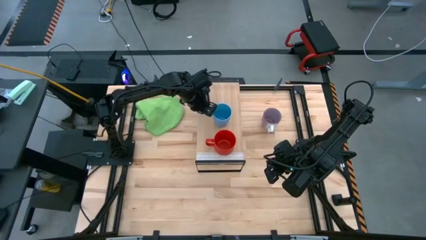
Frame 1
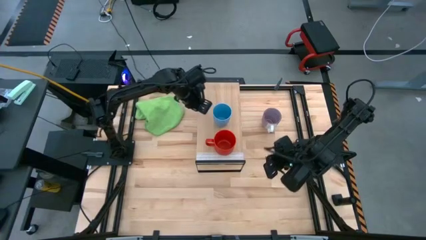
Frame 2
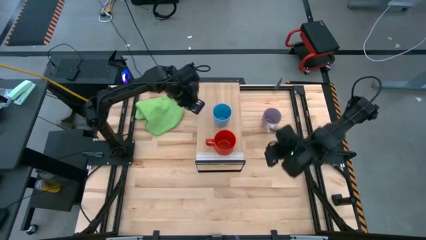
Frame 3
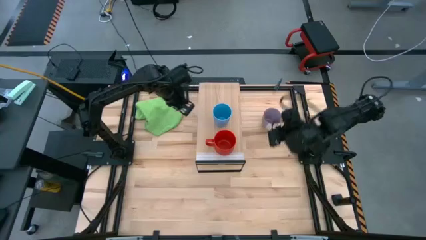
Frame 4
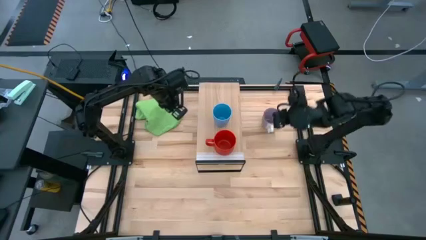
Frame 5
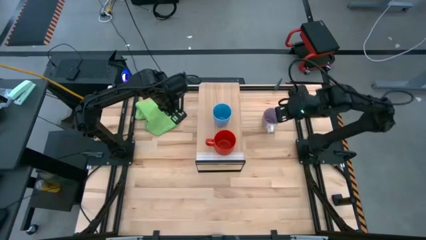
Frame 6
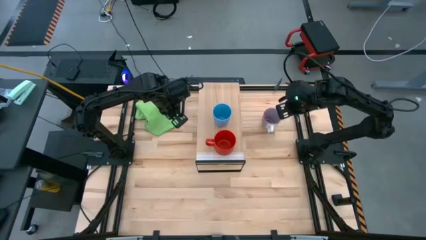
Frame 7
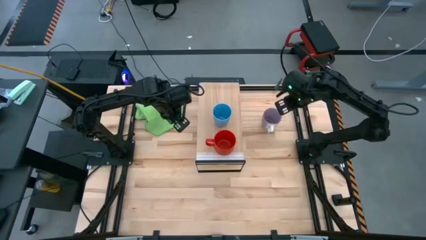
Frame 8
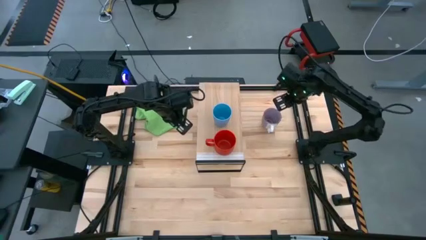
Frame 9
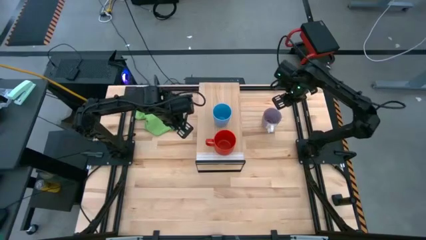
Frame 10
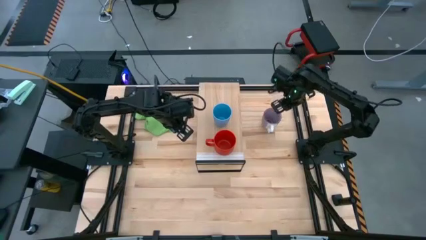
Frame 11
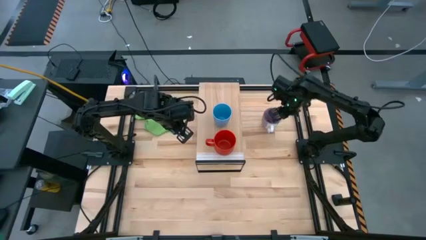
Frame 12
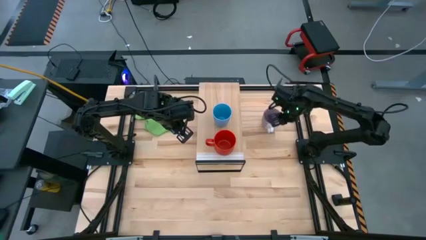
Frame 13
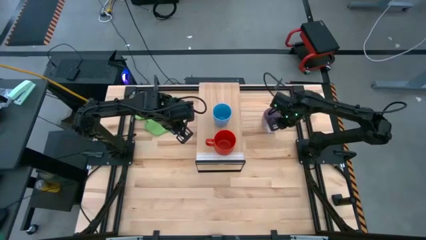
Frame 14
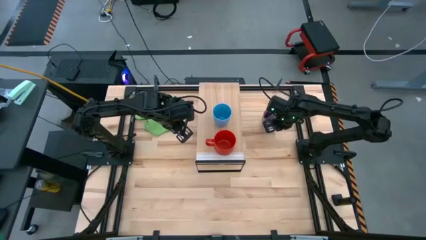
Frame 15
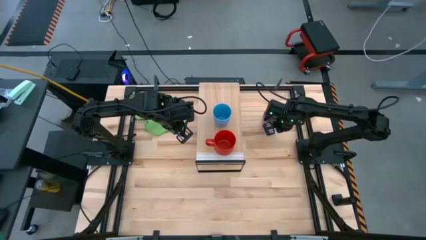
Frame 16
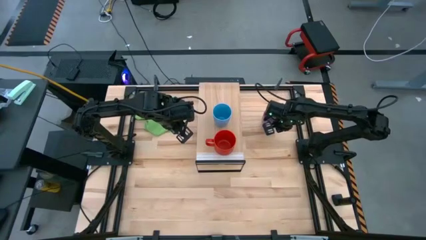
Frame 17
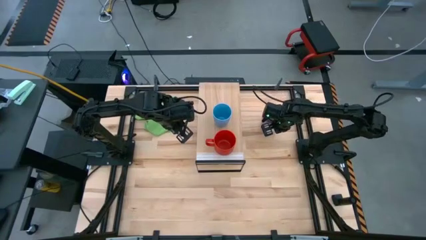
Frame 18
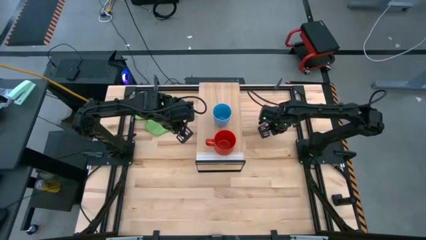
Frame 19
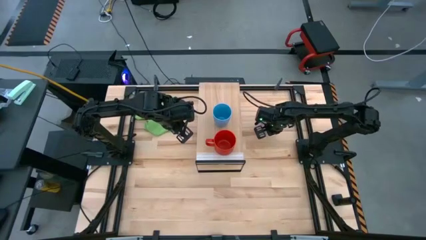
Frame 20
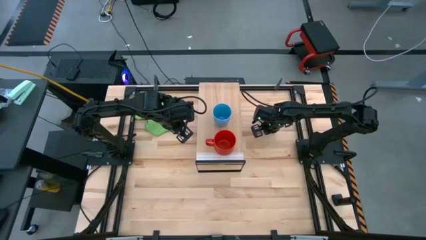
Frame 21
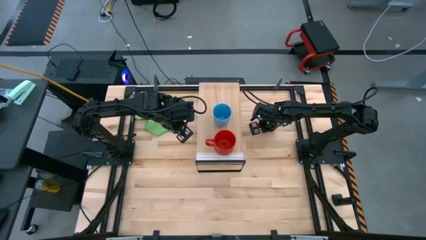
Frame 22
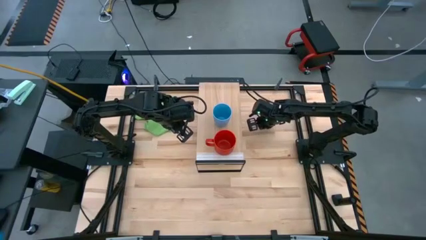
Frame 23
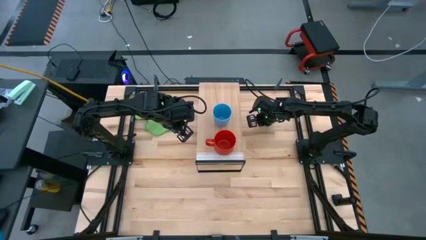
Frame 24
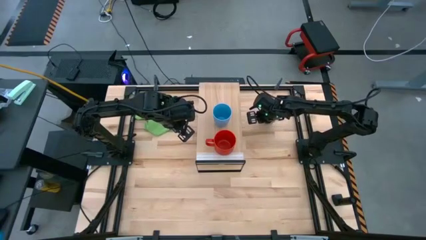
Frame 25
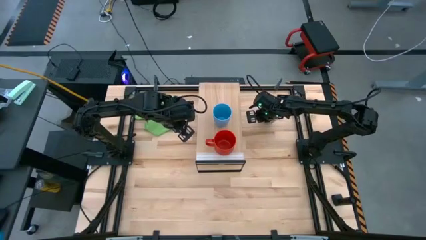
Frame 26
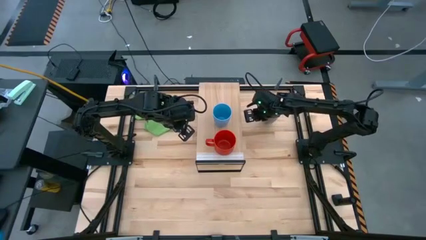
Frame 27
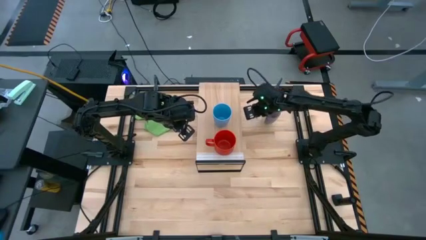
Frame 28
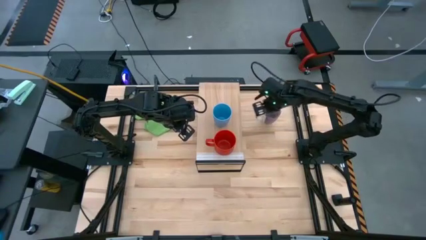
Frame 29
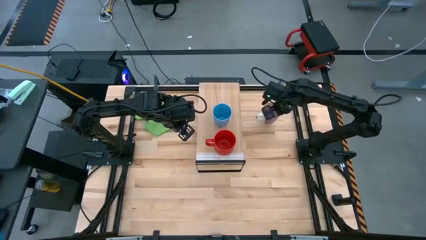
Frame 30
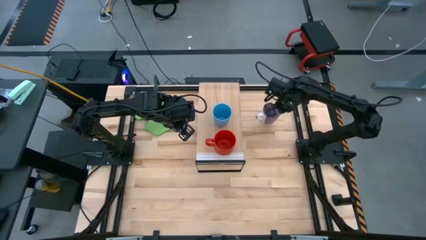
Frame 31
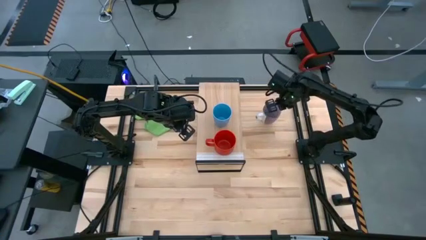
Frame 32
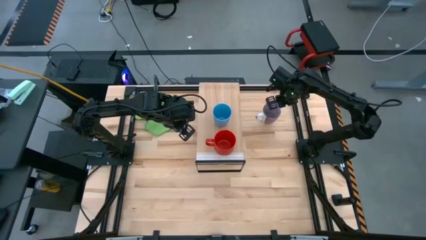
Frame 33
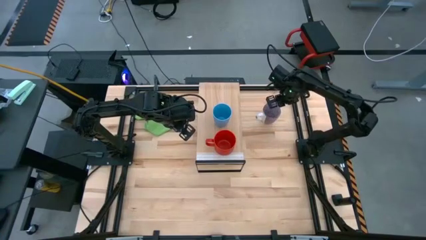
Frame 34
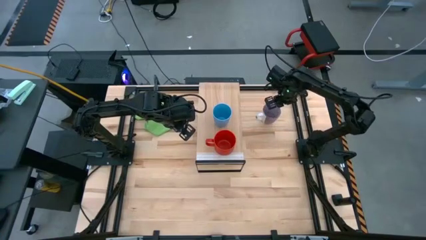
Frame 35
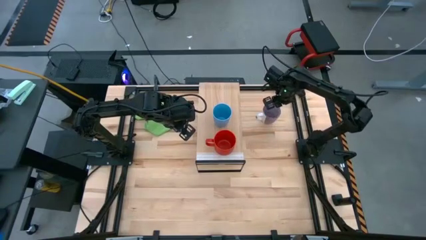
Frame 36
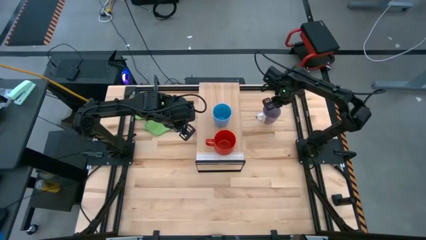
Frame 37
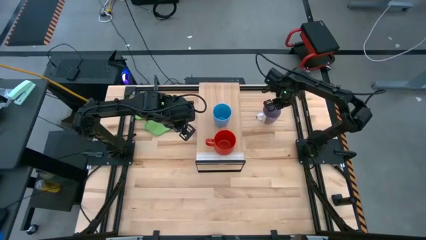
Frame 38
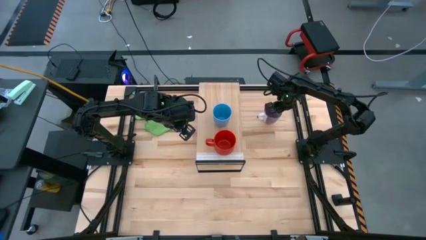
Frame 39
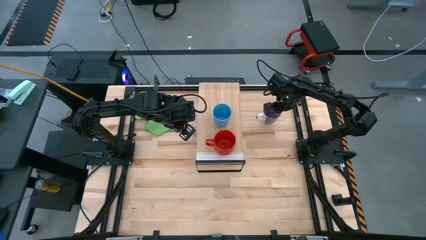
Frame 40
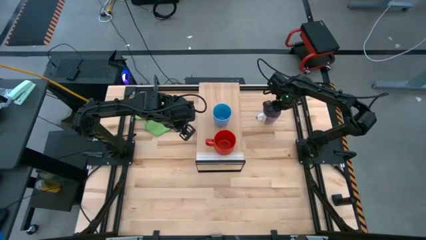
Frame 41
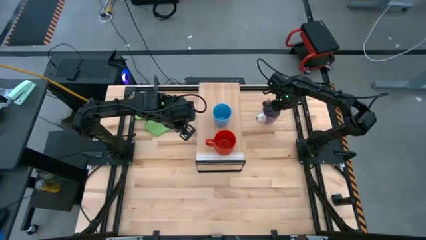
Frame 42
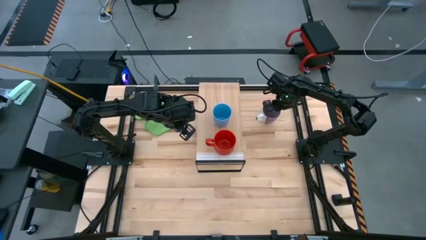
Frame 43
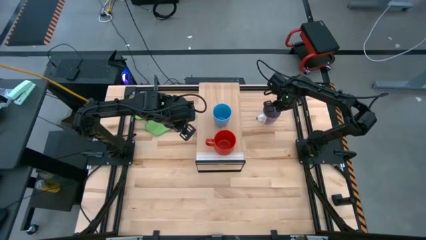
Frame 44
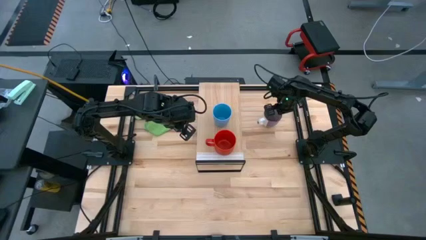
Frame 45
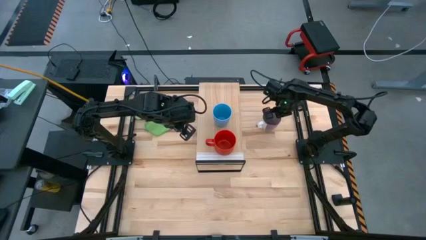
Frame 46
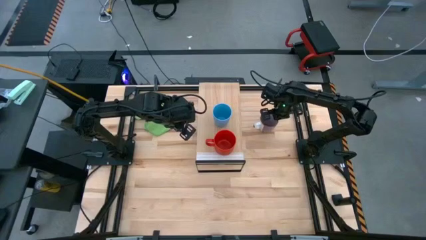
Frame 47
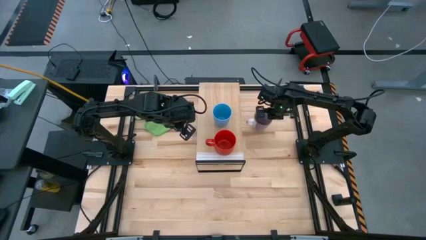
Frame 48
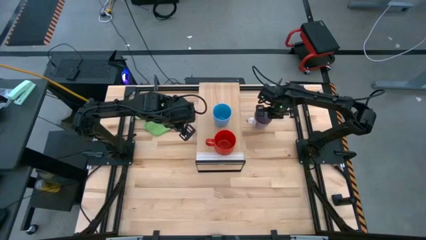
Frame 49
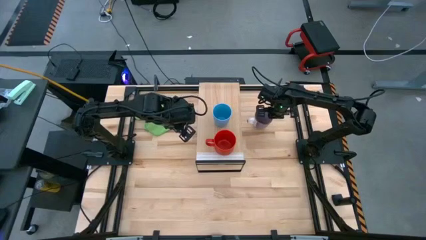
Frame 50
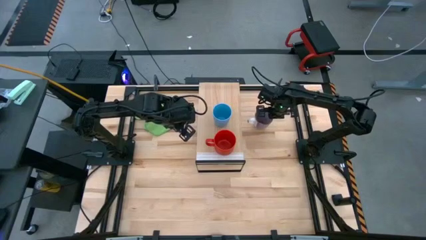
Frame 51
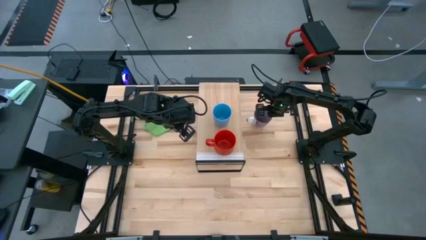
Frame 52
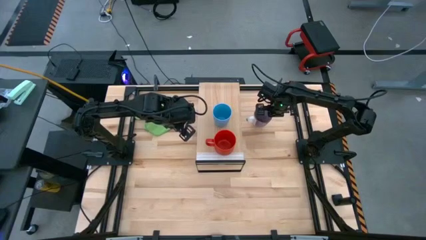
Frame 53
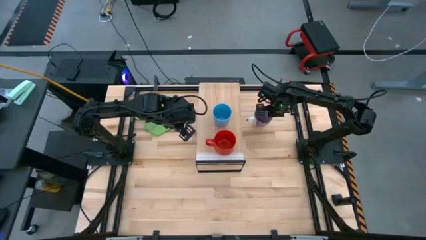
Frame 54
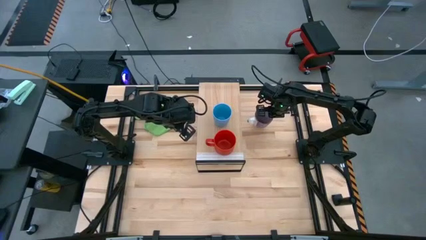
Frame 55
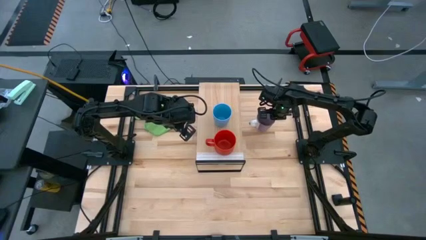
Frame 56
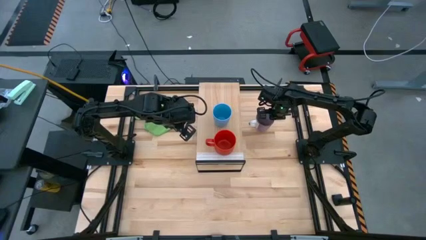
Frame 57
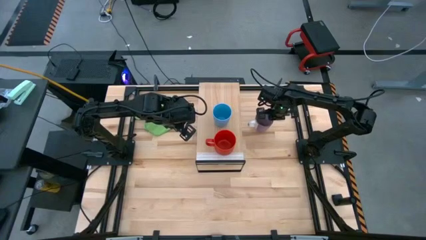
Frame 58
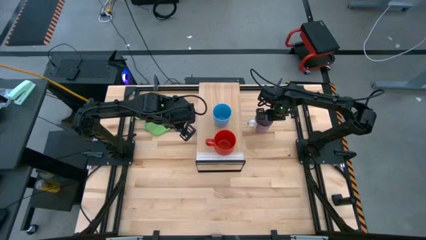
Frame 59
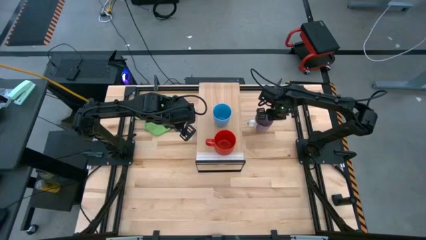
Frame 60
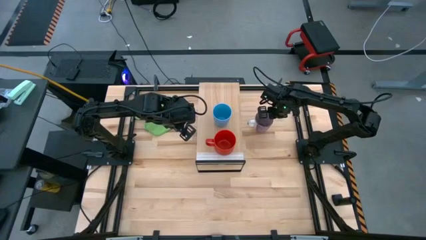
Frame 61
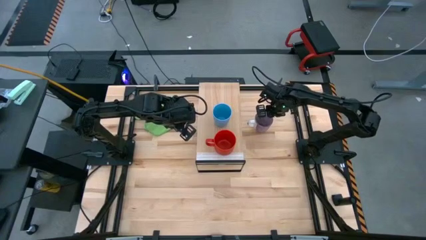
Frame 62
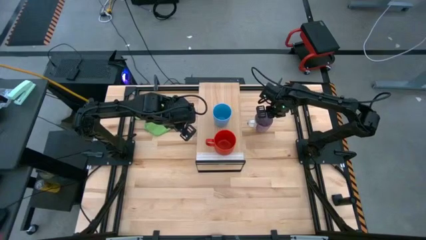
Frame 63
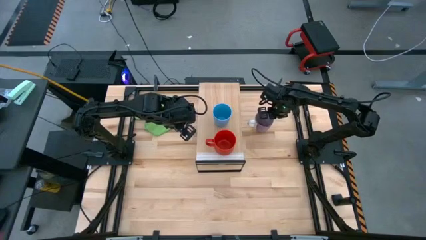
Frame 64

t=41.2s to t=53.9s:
Task: Stack small to large cups/mugs on shelf
Put the violet mug on the shelf

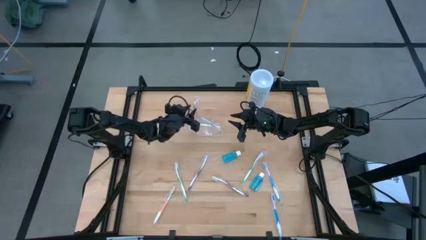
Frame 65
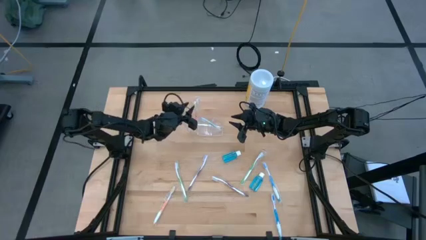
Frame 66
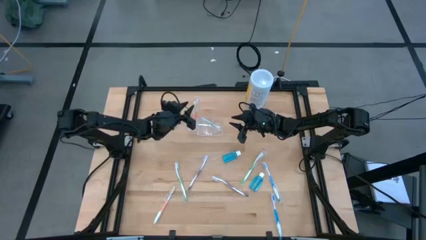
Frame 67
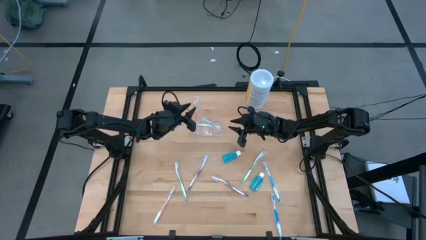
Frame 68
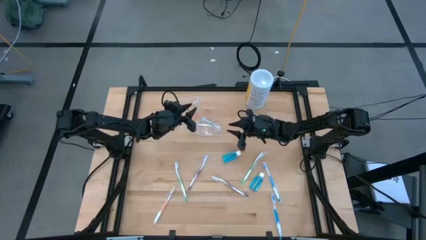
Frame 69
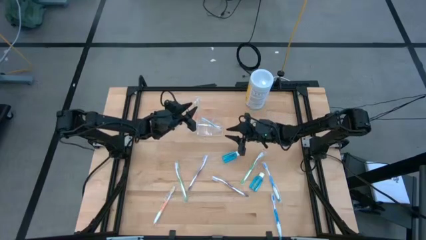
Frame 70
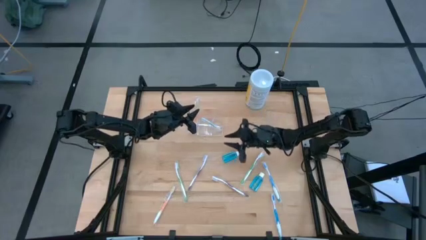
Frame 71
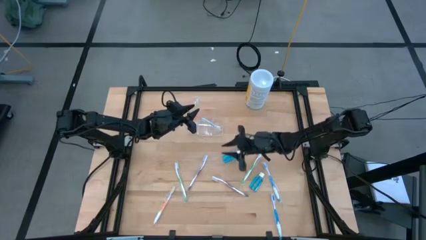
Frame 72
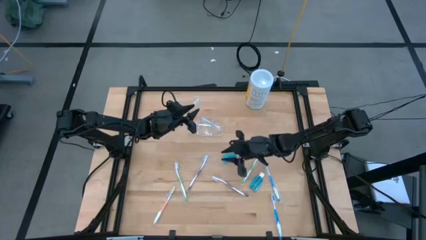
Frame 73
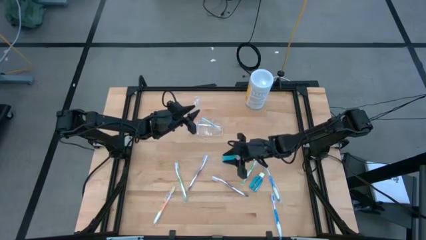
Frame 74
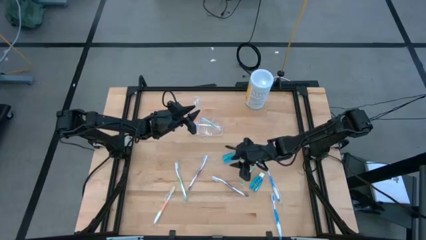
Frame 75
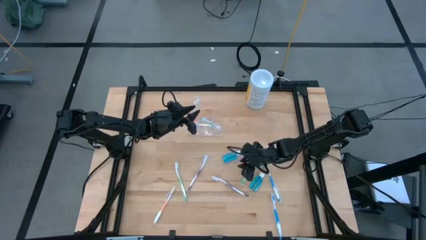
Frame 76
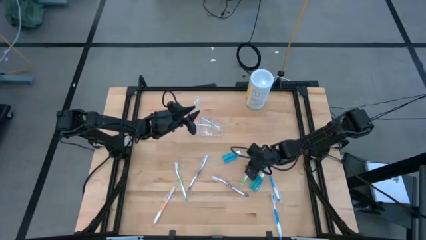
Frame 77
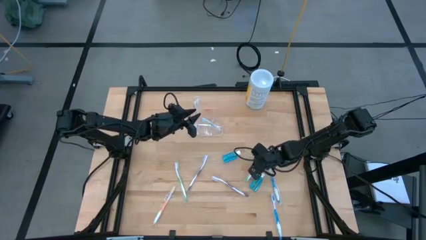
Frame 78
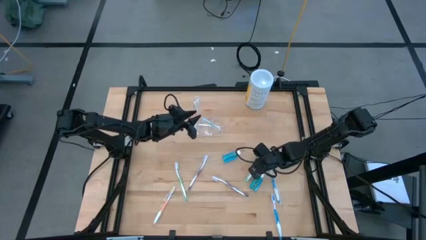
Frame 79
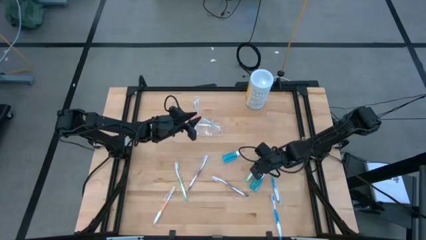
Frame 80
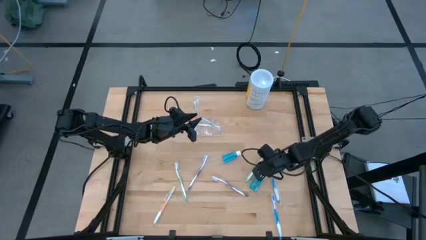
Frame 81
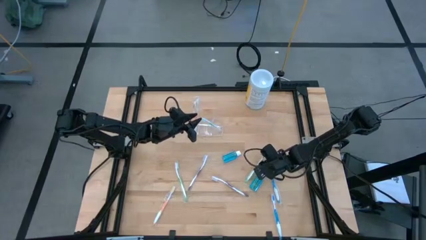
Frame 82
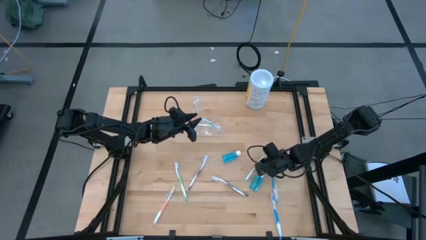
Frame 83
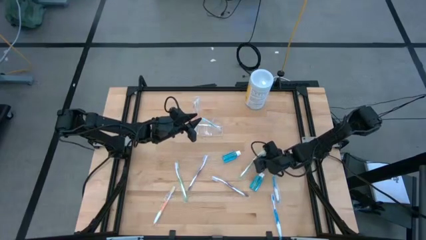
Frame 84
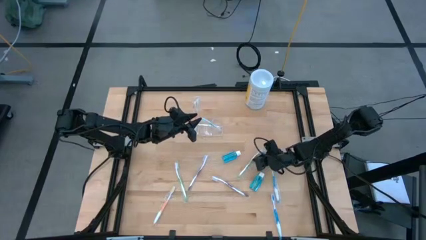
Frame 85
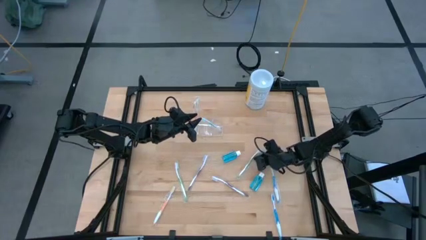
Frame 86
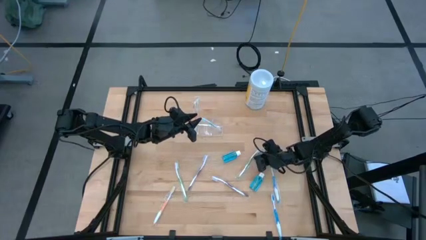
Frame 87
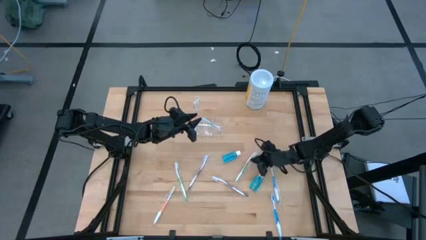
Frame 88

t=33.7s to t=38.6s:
Task: Pick & Place toothbrushing station
Put the right green toothbrush into the transparent organizer
